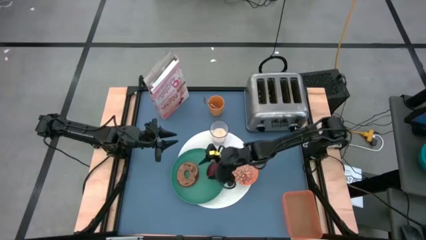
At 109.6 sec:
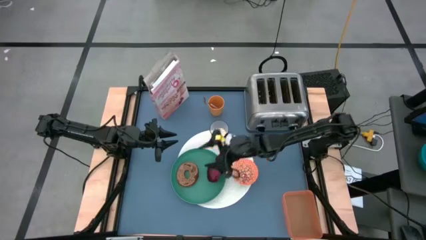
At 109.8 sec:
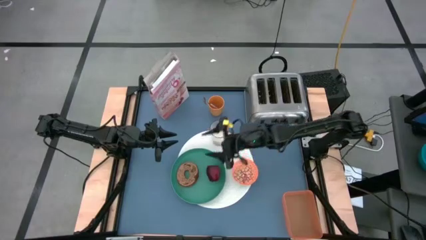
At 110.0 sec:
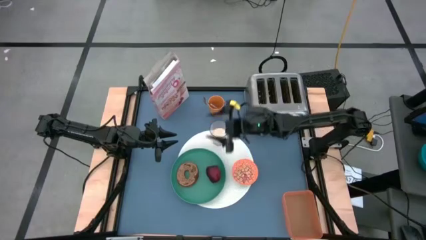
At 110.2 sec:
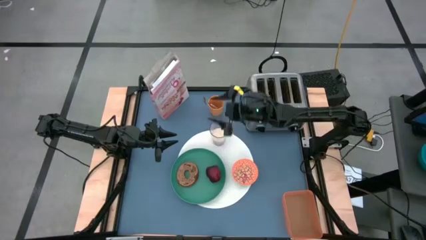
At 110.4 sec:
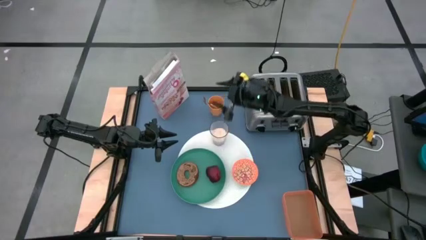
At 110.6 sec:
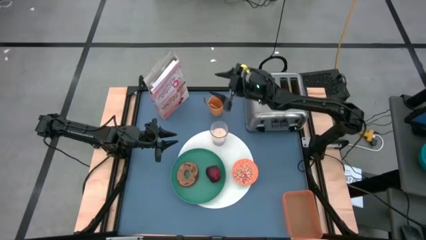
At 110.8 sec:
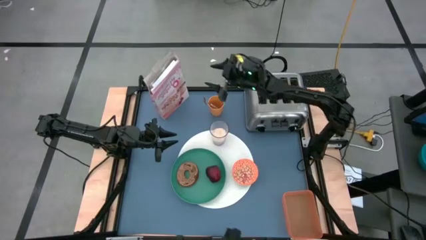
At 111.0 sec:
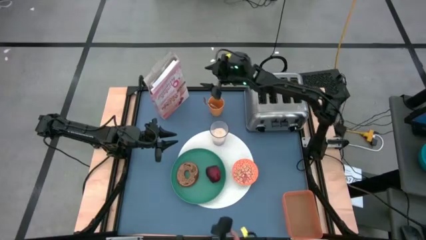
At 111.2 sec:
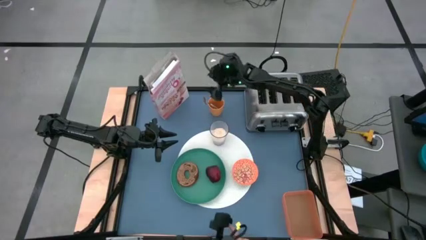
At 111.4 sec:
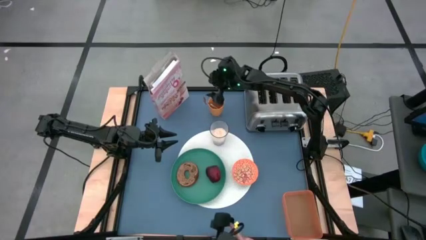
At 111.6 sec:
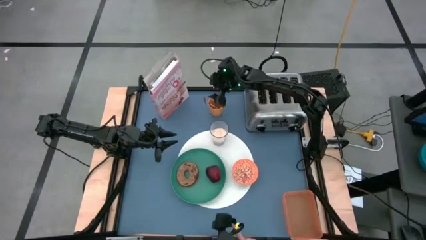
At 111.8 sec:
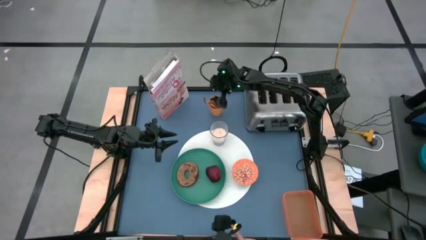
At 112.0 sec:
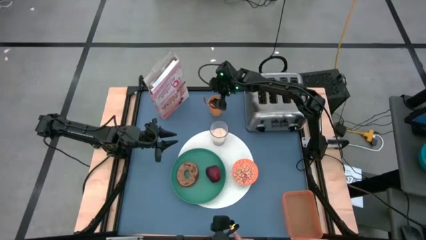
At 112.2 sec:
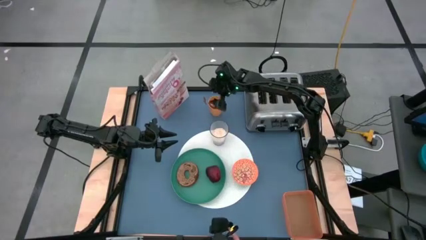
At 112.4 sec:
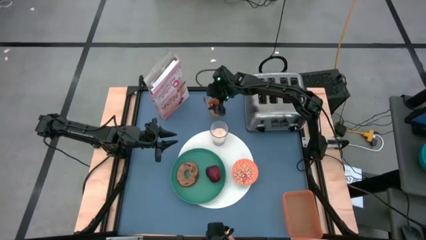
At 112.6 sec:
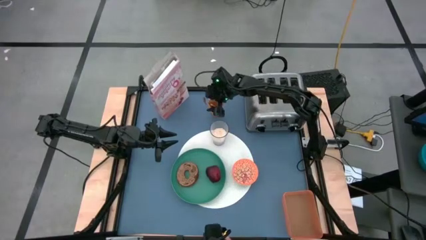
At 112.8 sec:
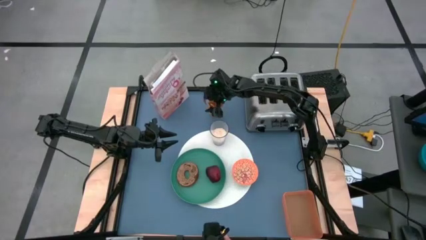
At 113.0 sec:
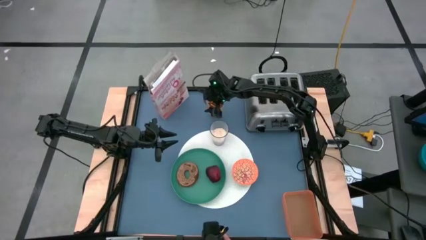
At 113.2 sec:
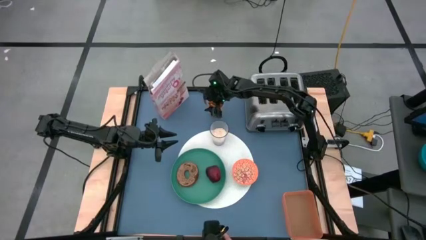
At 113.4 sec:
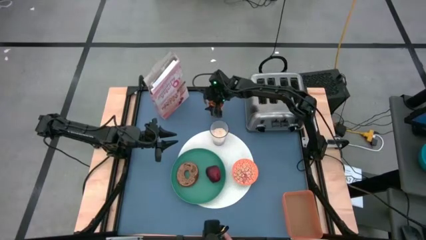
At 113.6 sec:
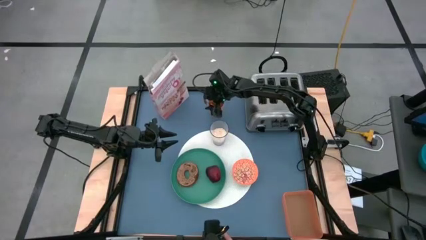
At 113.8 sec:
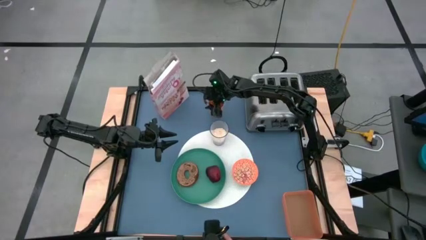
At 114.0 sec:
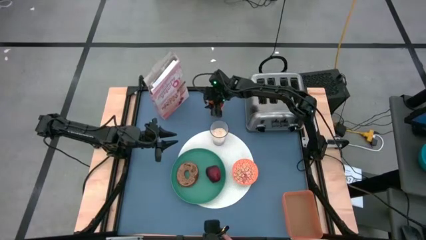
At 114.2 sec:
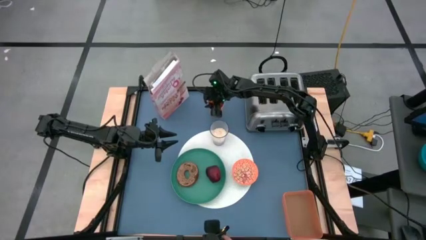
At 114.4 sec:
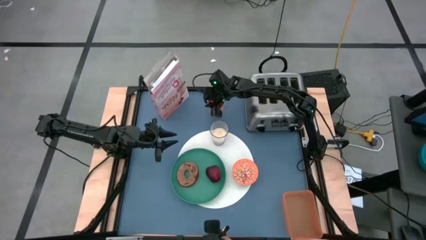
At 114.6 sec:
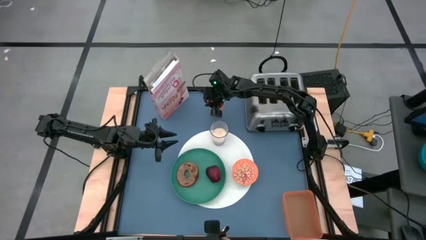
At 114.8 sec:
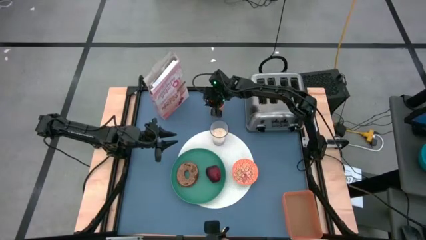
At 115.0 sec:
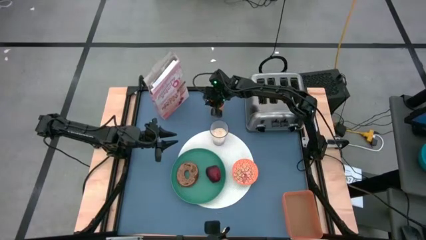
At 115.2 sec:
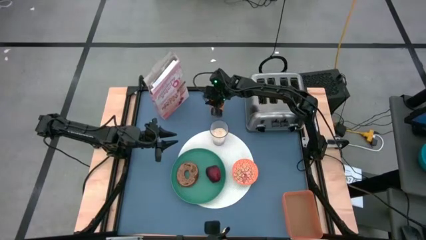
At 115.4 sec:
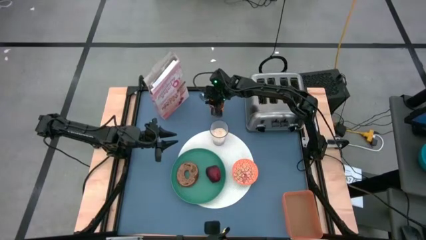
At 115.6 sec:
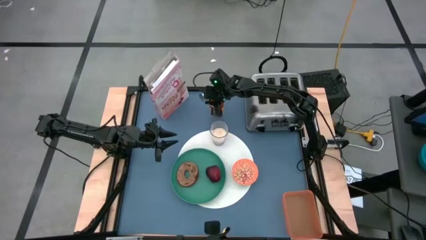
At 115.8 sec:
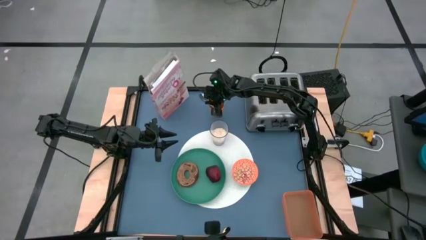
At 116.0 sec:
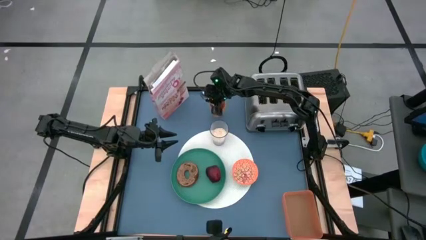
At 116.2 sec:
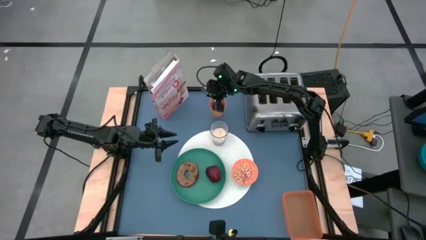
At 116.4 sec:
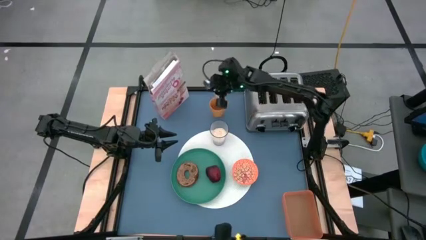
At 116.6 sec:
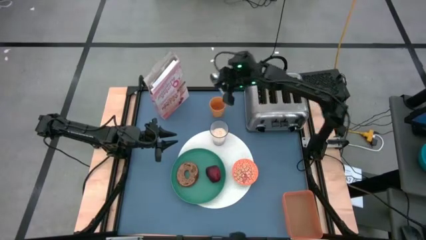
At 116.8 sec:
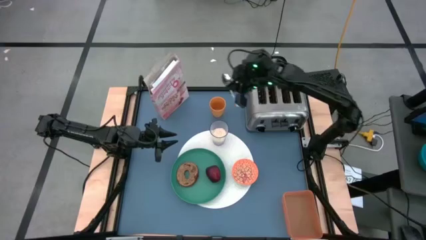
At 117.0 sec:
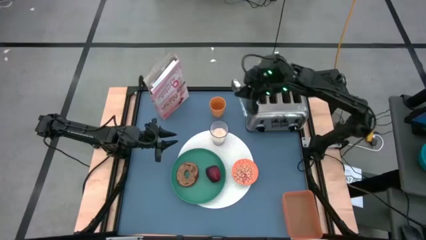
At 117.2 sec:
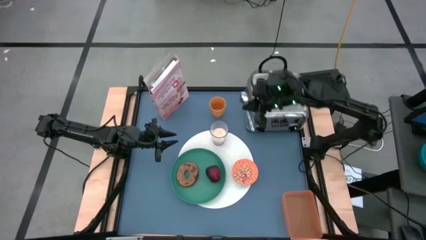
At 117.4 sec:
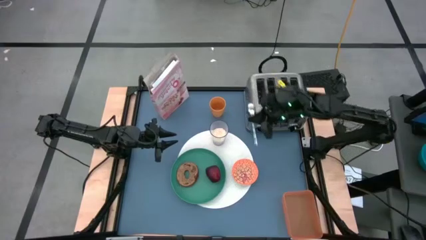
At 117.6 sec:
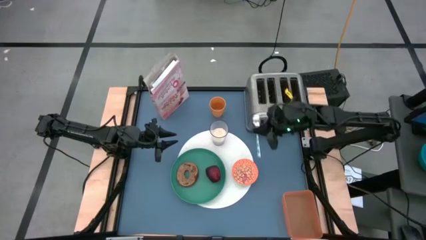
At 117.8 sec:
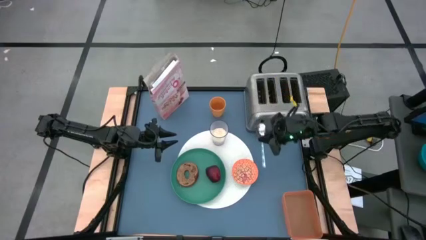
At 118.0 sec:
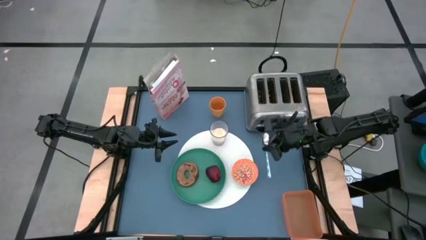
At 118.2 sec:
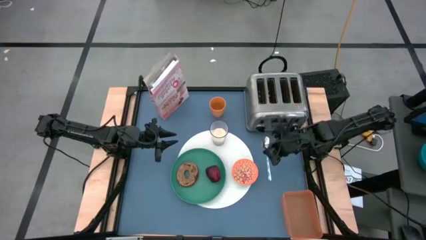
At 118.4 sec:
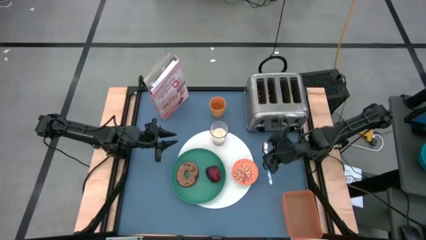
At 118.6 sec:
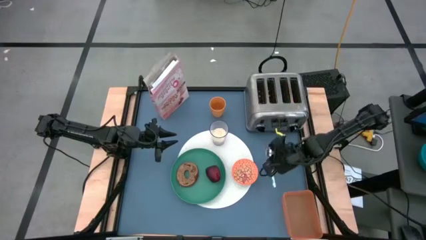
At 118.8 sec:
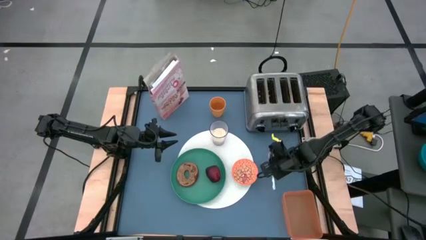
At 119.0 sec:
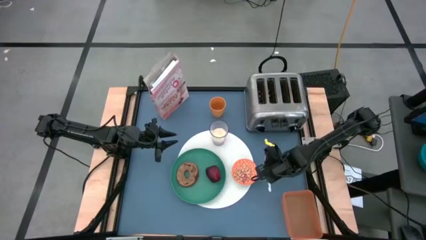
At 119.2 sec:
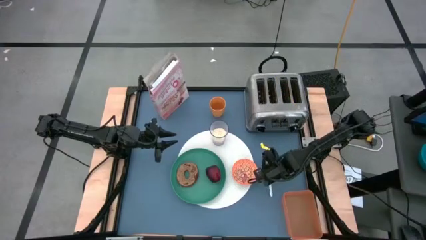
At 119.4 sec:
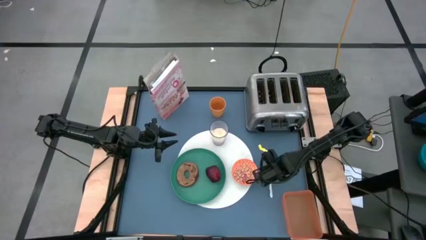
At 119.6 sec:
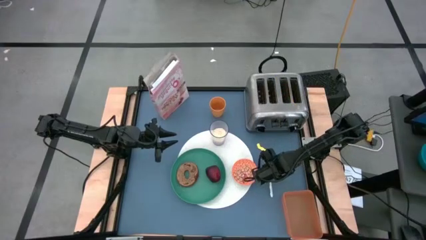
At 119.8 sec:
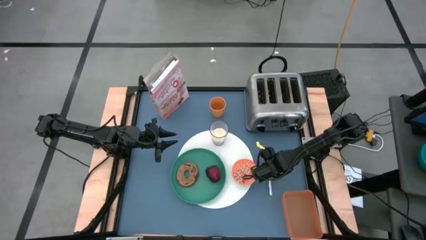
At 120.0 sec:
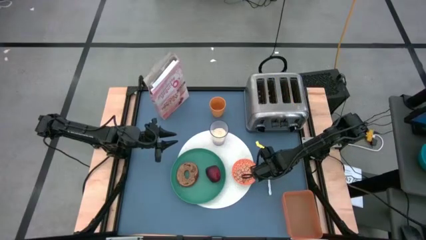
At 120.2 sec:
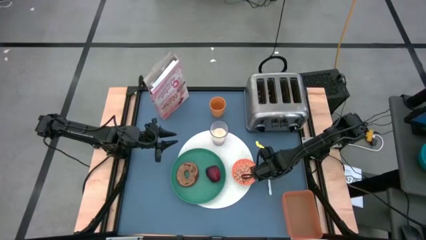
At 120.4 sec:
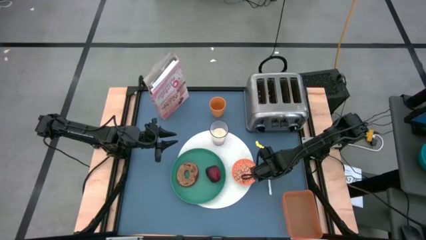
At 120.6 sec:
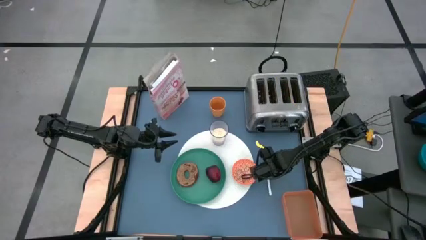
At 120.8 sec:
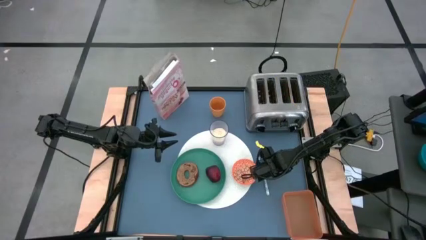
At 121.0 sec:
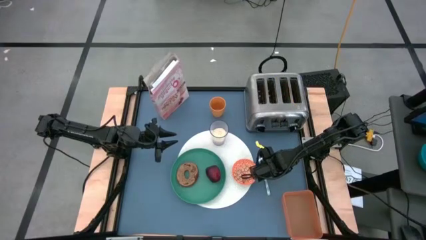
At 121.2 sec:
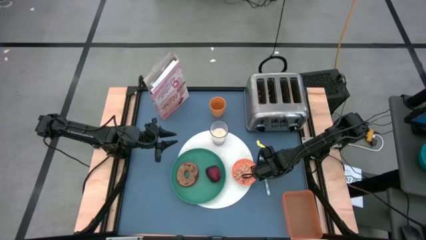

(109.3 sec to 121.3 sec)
Task: Arrange a breakfast setting
Put the green spoon to the right of the orange bowl

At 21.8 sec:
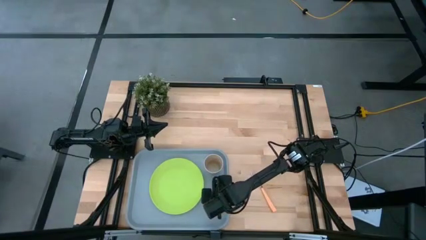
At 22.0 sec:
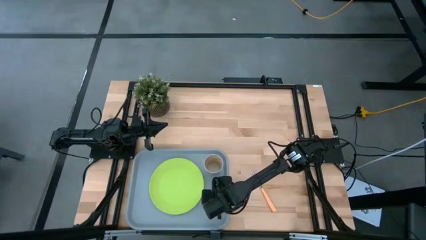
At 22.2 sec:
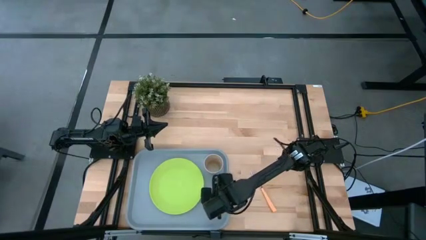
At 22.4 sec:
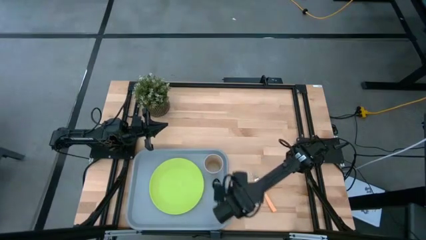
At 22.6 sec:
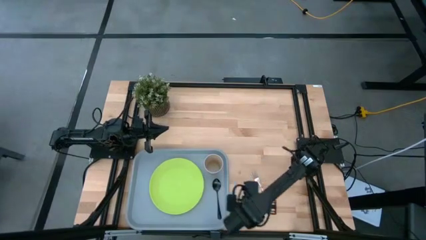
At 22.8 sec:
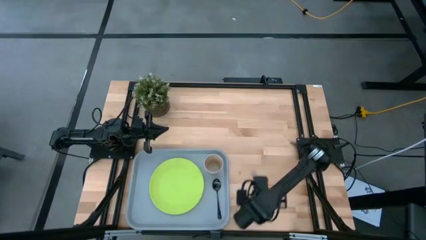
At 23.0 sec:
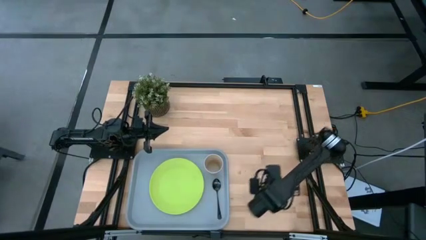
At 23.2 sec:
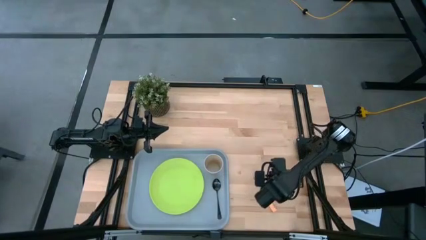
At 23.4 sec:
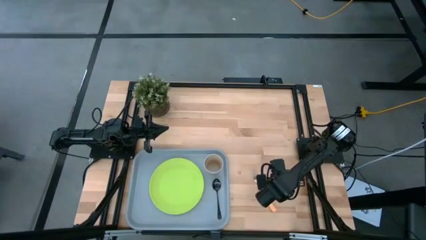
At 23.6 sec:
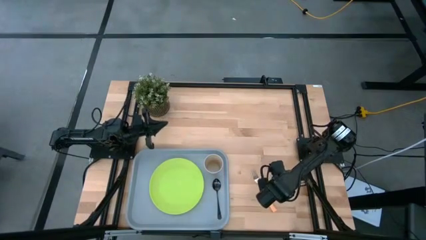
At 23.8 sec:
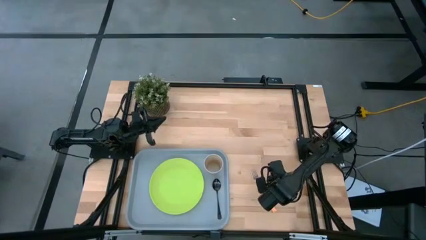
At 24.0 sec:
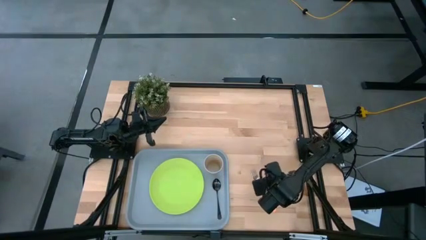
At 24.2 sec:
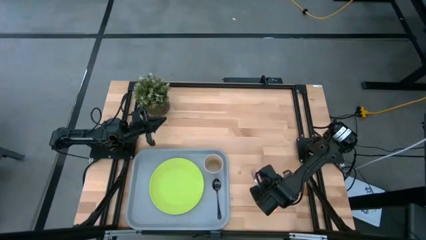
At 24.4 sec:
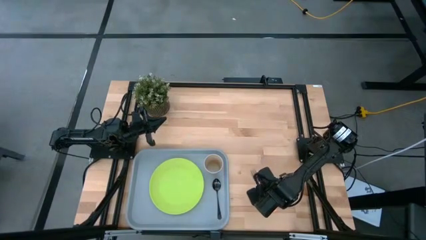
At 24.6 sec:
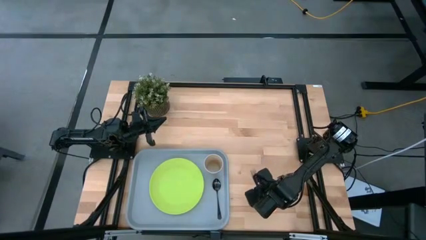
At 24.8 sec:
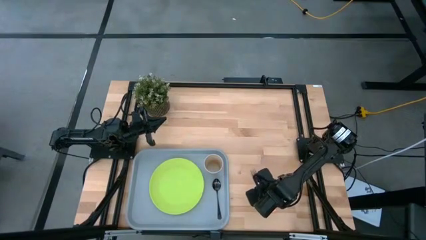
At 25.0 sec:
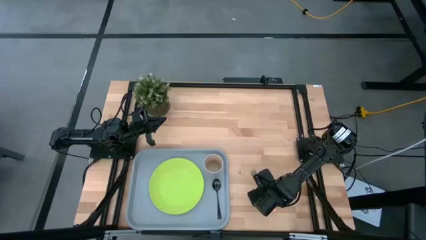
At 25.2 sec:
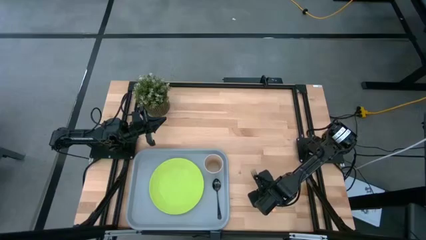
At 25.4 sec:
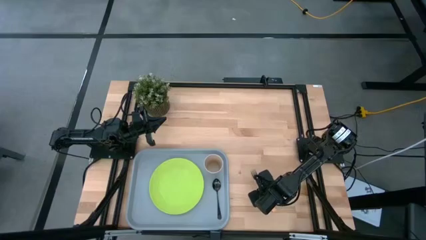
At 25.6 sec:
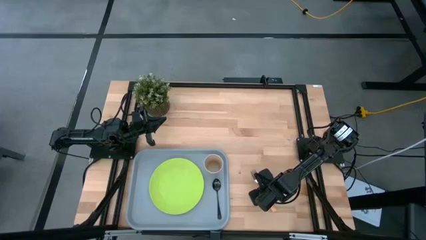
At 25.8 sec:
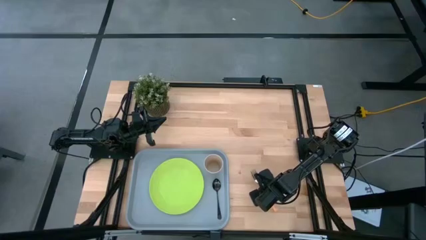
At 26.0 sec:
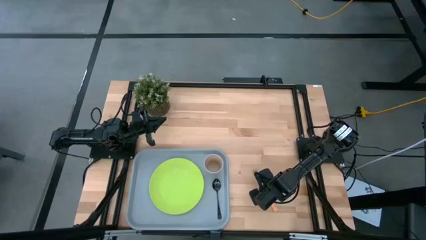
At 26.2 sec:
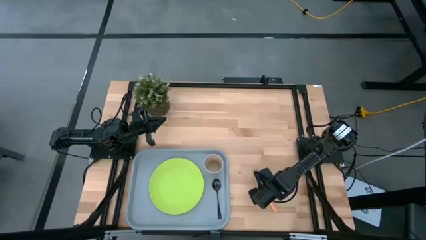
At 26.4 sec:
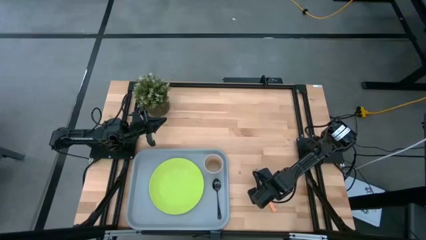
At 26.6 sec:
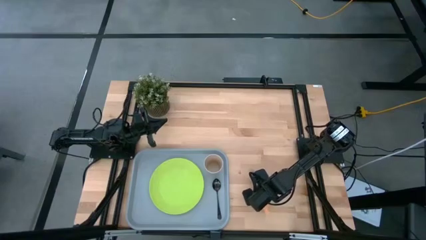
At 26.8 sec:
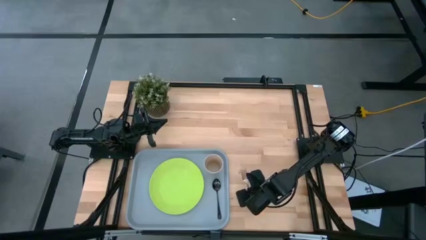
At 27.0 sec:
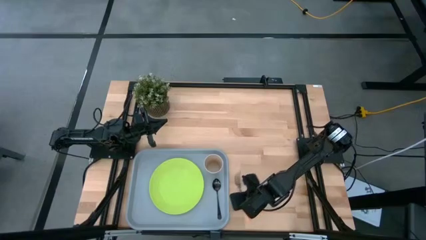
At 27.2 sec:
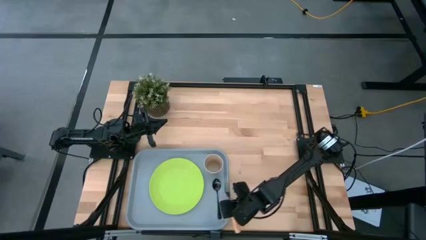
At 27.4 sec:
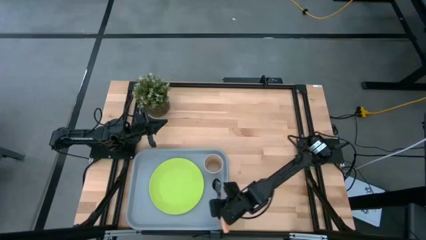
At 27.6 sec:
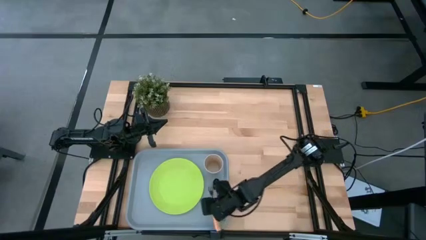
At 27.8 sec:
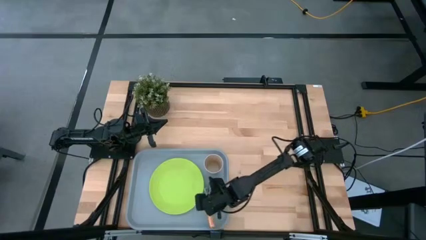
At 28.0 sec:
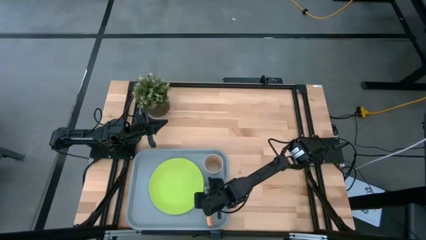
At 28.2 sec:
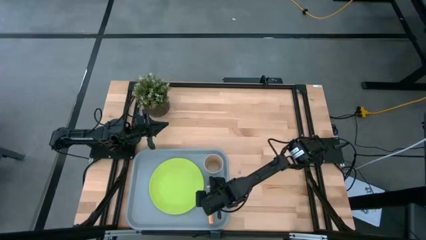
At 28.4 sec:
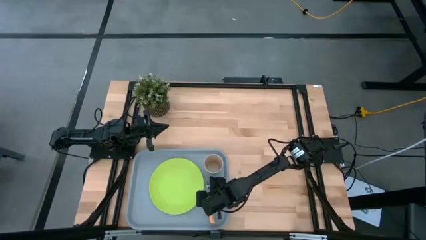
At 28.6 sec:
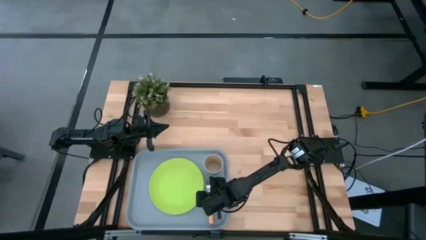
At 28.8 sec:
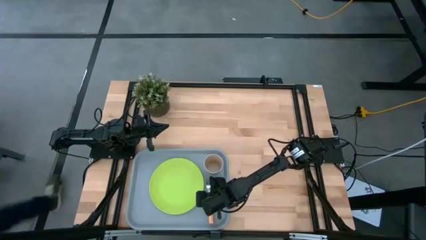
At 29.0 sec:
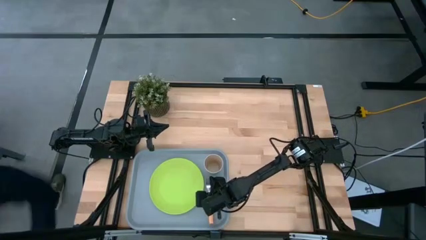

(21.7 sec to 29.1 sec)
Task: Pick and place plate/cup/fork/spoon on tray
Put the fork on the left side of the spoon on the serving tray
